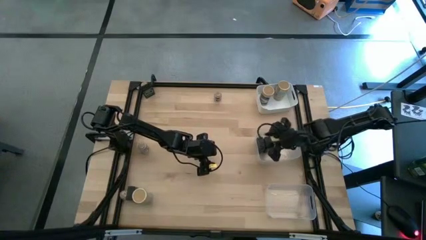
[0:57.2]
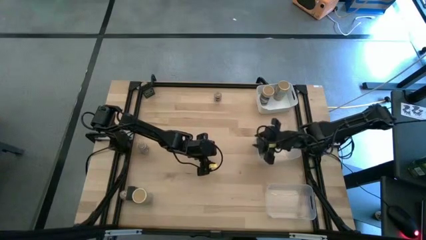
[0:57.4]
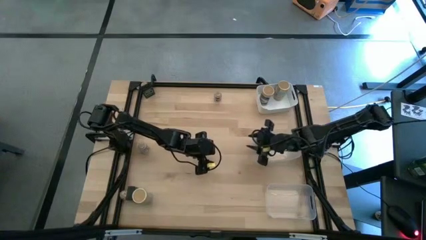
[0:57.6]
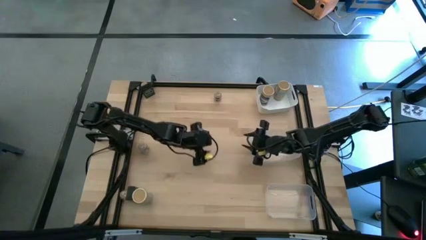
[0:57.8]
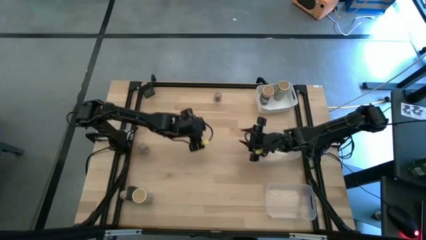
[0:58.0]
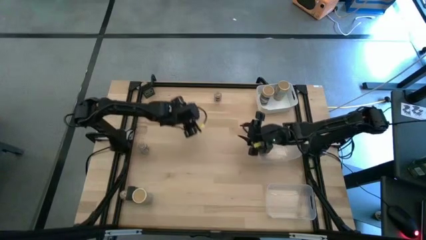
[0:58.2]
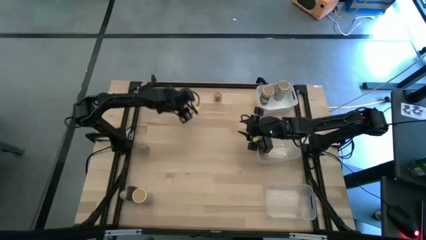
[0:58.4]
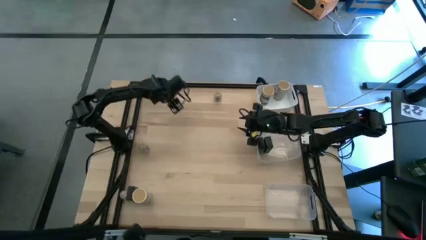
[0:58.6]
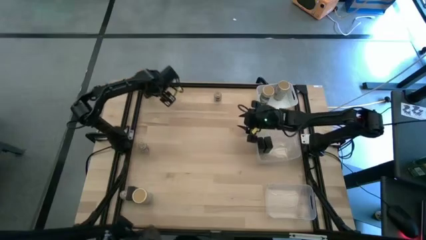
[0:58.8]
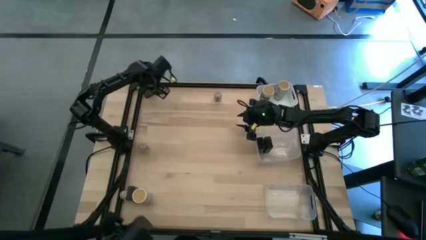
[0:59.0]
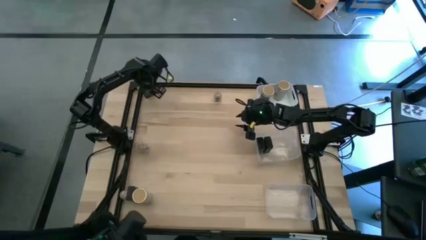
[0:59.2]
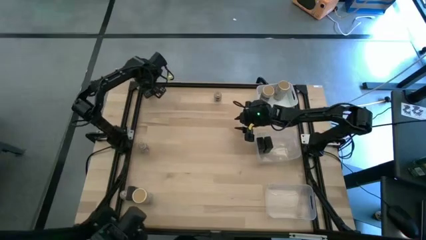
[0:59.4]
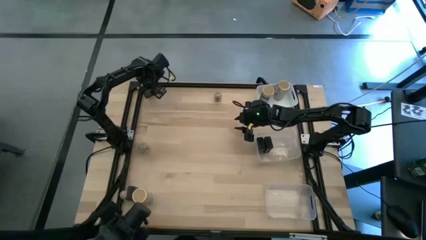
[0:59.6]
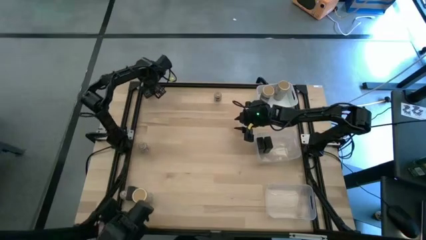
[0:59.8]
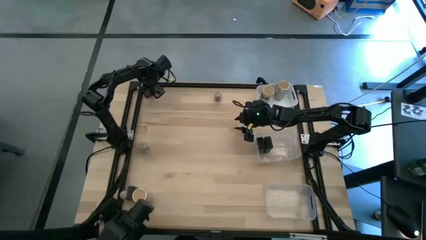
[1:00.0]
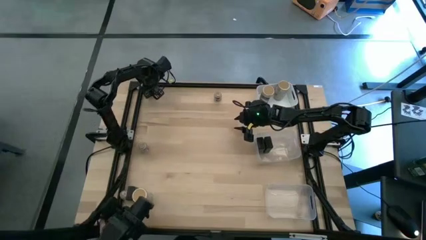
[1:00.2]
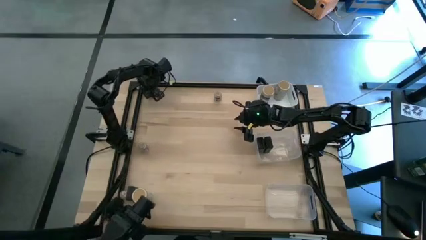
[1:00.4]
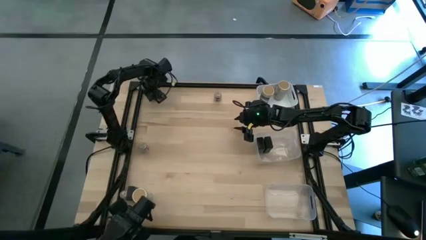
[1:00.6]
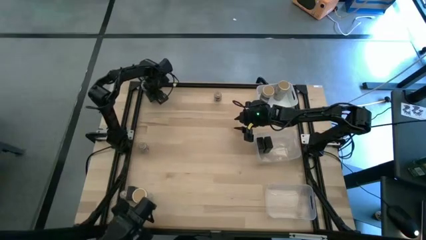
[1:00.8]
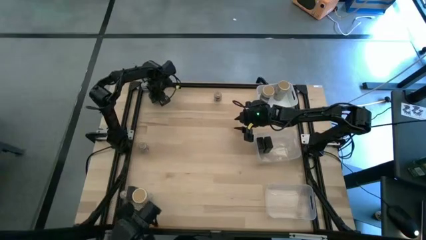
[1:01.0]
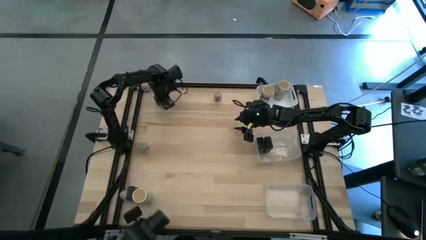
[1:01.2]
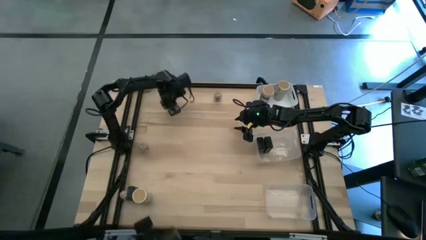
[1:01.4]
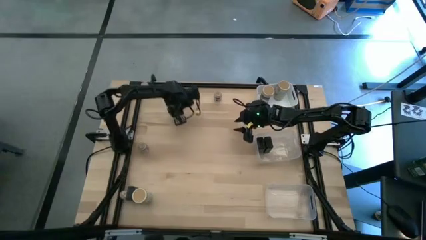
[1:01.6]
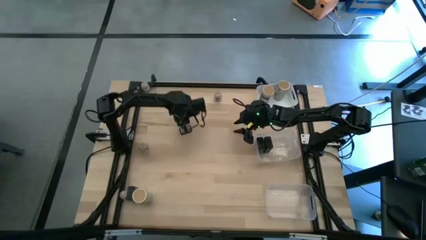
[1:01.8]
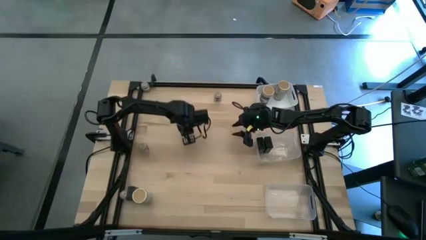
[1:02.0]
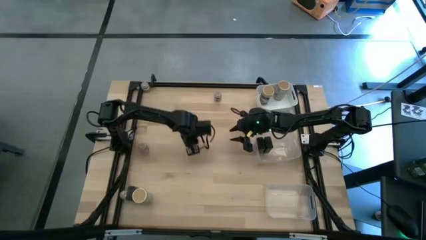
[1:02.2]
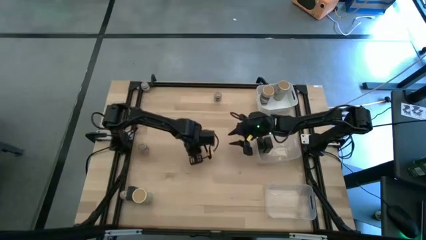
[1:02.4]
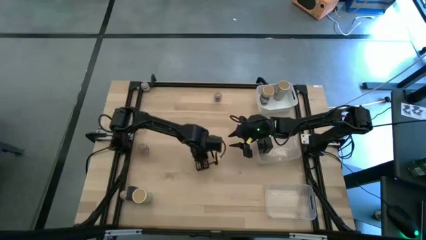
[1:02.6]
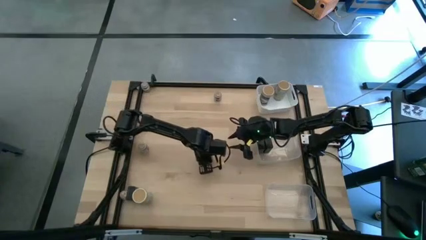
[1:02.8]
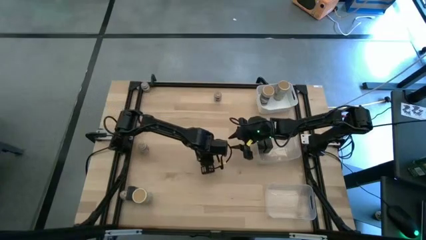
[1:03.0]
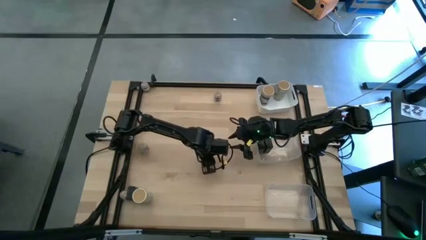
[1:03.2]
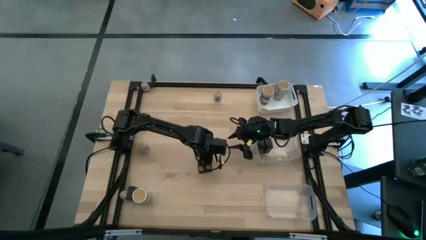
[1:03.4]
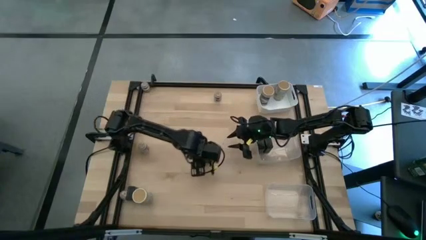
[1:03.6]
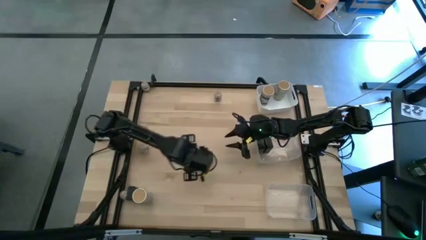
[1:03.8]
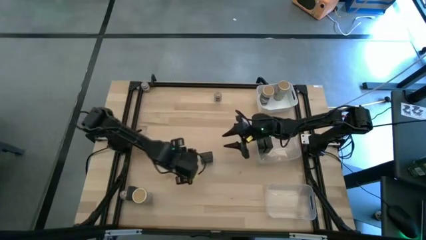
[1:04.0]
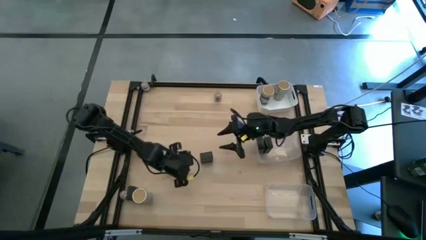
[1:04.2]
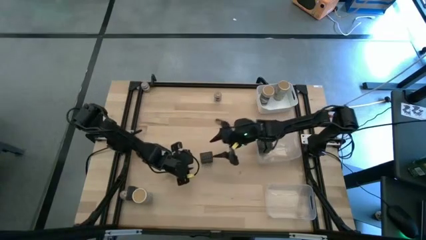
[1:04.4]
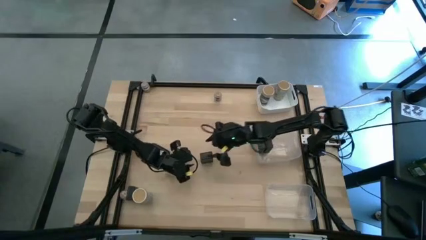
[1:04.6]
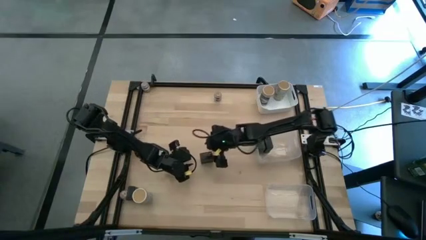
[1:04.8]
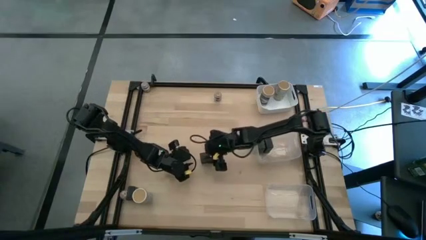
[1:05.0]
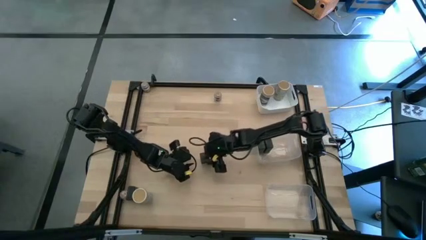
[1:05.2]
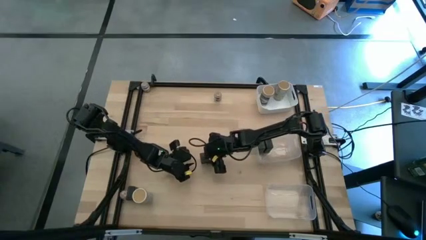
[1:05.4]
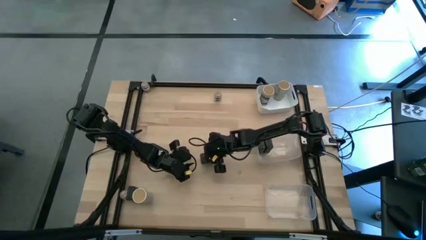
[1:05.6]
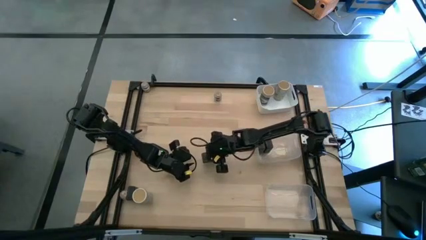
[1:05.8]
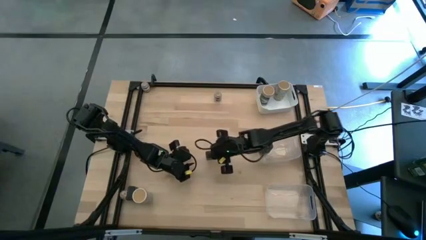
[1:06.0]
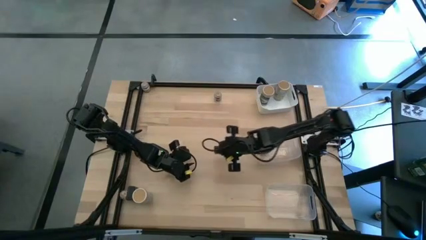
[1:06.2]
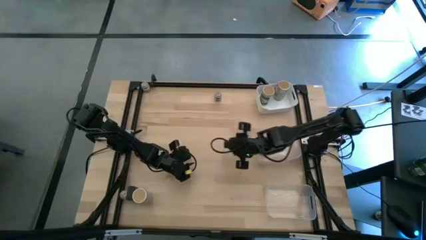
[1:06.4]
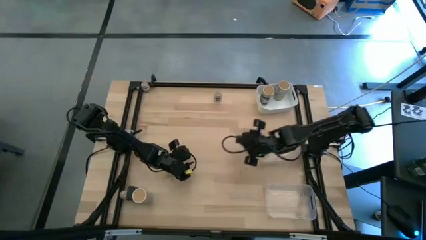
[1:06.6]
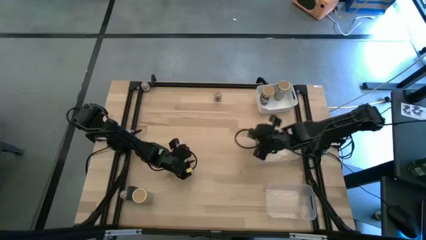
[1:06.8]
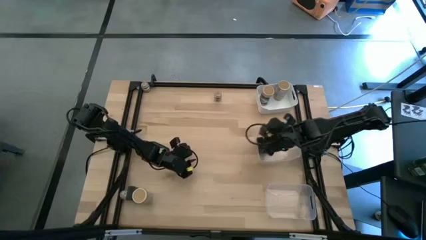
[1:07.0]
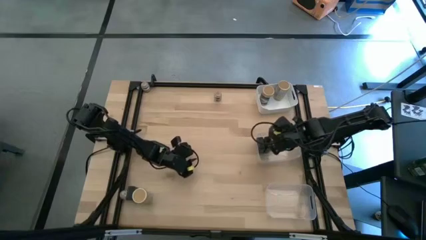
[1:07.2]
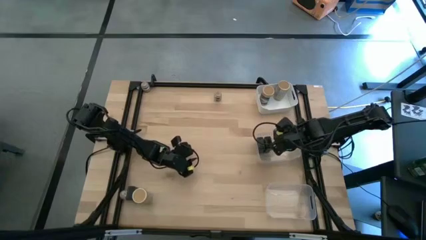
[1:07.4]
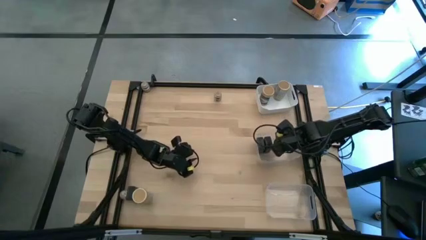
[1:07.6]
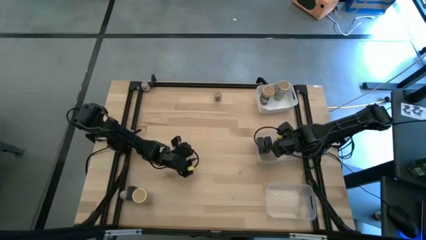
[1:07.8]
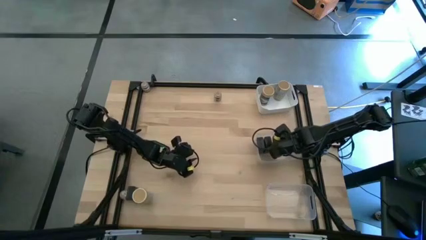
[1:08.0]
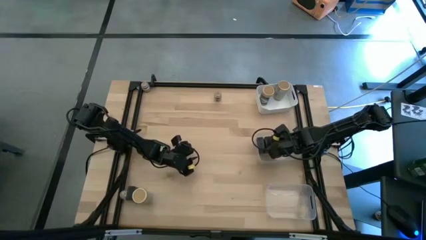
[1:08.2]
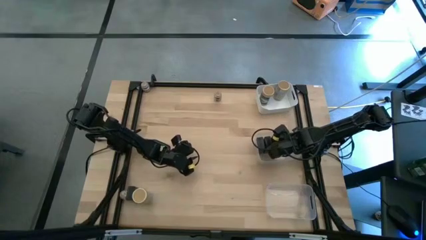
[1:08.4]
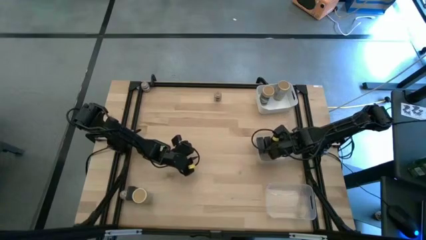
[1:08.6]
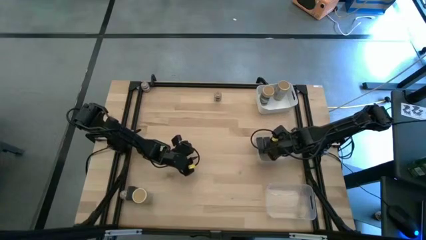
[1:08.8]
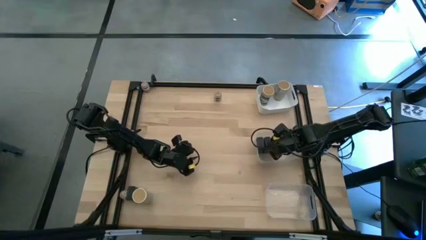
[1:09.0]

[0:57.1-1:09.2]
Task: Sort spices by type
Put the top black seasoning container into the top transparent bin

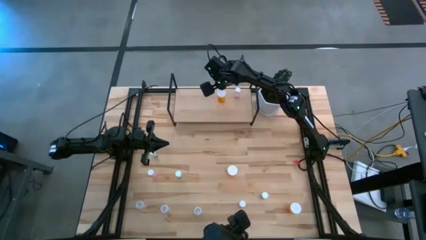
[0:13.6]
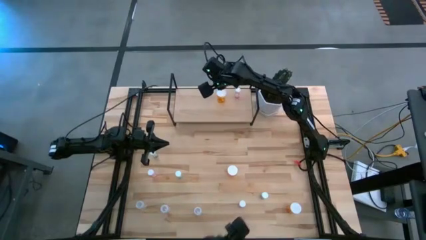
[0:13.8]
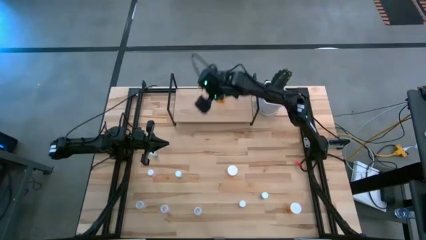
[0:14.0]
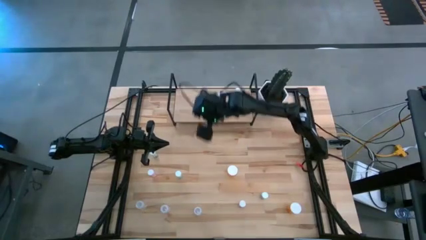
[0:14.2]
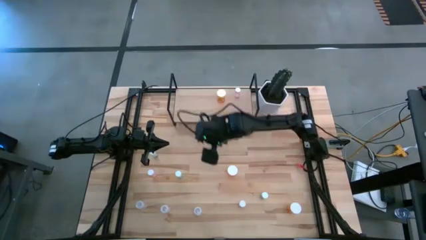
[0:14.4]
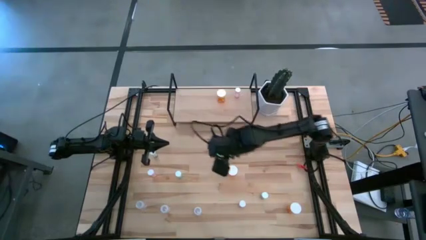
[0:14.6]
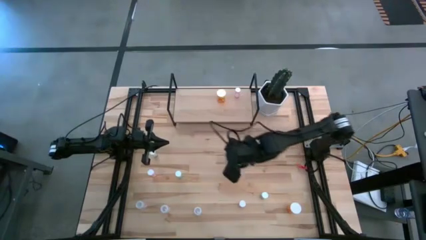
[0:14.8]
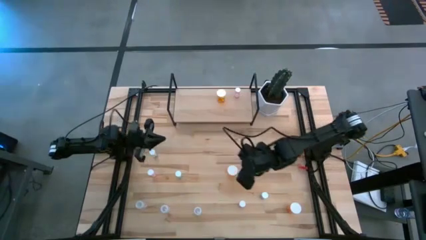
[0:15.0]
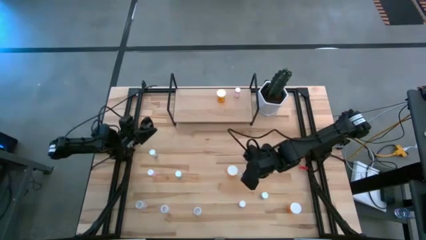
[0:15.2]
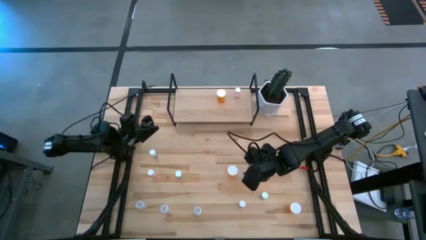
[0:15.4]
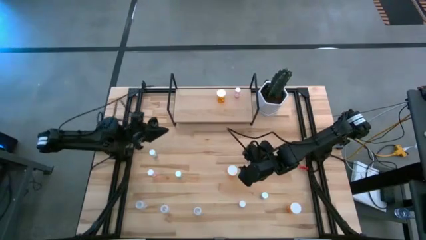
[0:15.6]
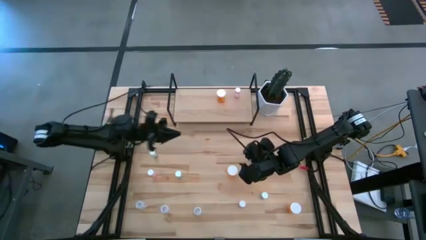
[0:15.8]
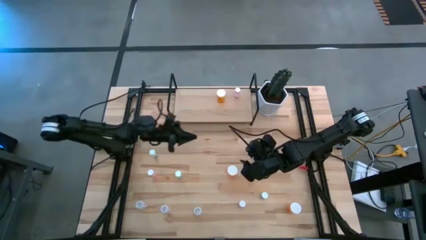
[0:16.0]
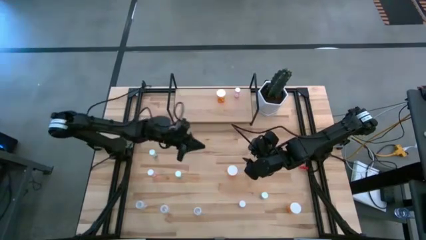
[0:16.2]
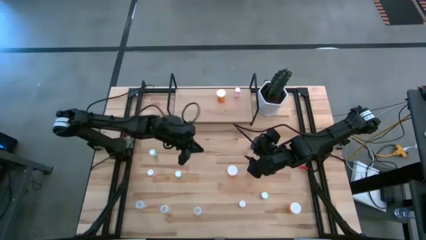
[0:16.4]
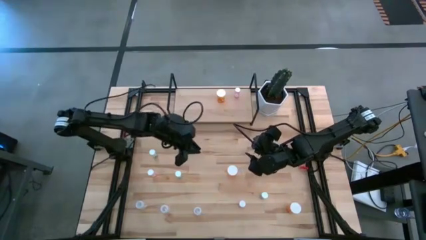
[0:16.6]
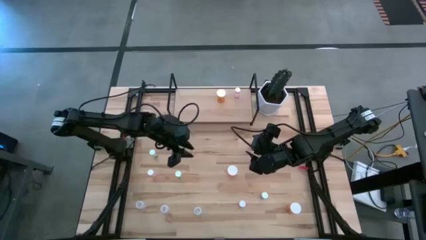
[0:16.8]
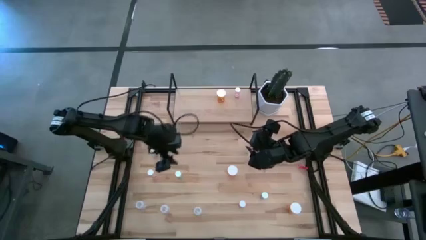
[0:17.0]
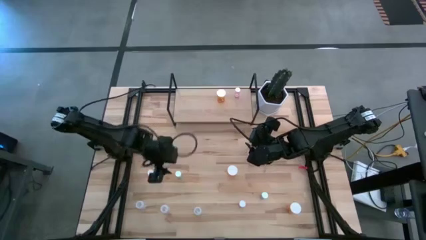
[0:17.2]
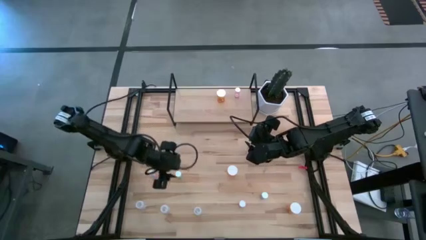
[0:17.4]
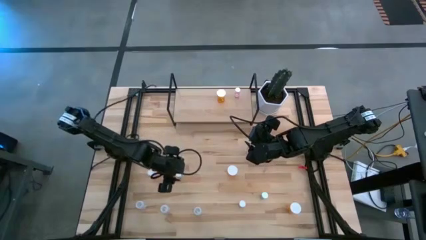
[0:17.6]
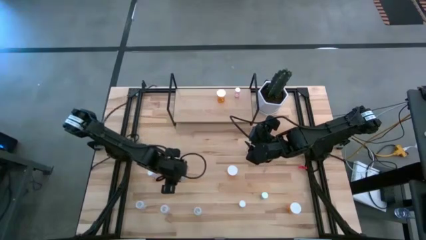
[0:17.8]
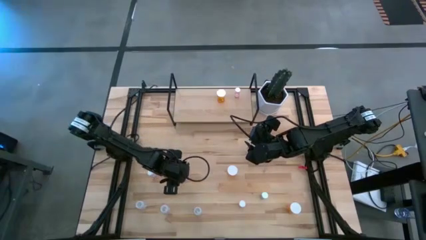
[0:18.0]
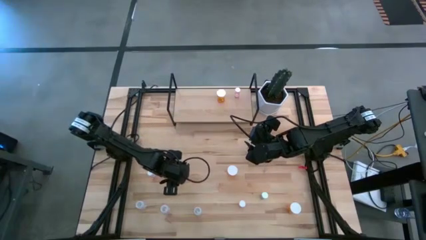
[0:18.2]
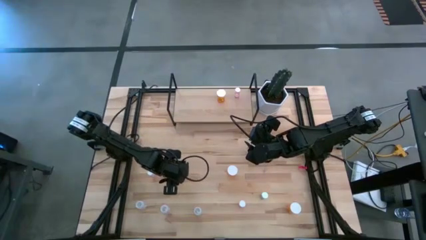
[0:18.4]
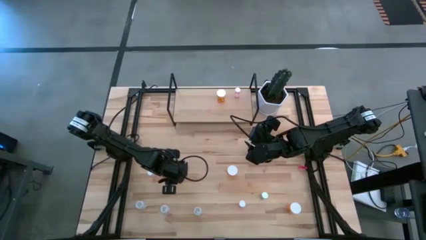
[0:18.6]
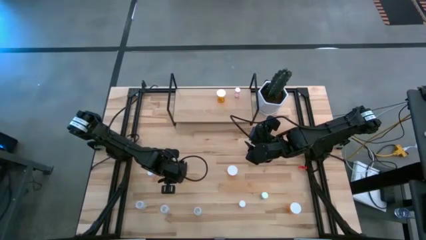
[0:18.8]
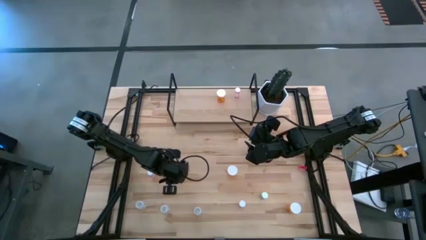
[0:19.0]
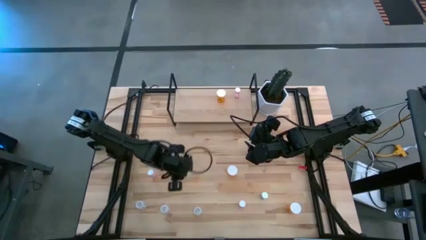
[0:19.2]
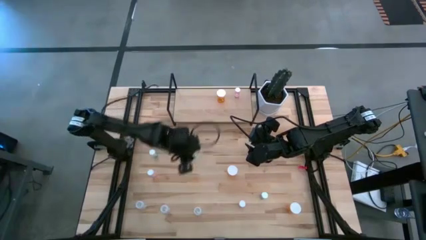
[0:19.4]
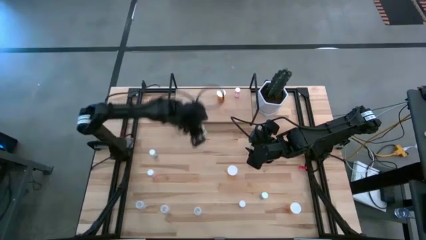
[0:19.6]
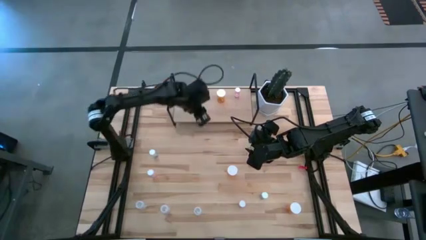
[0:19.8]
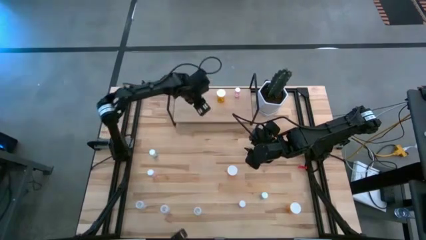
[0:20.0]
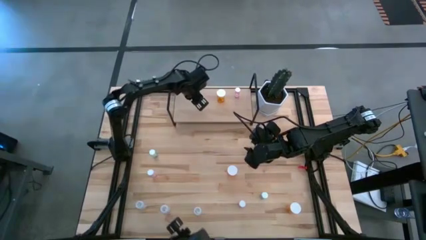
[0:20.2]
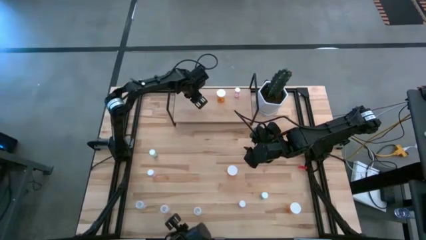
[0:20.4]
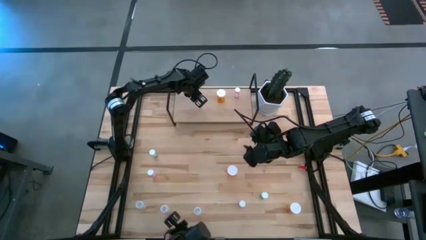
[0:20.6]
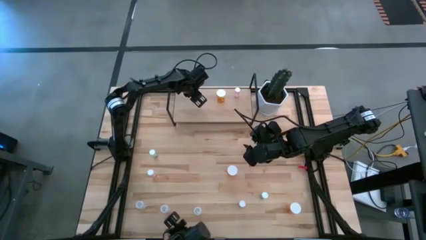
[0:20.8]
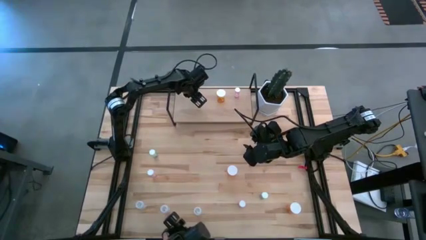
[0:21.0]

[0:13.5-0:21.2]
Task: Pick and place medicine bottles onto shelf by color
Put the middle left blue pill bottle on the shelf
